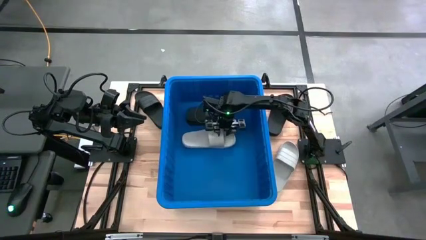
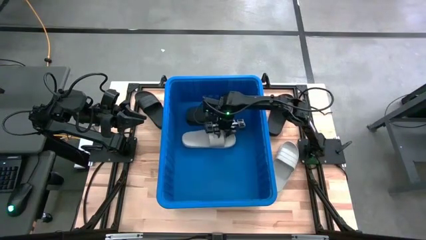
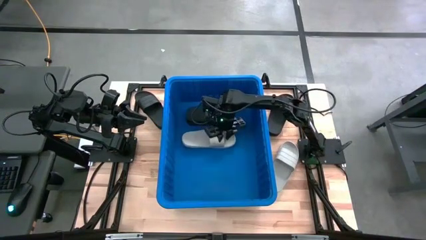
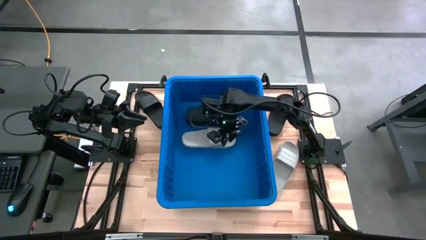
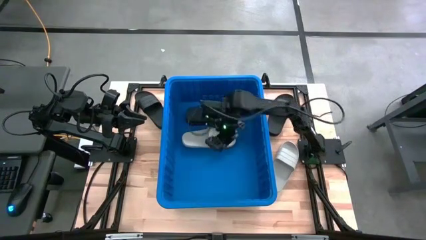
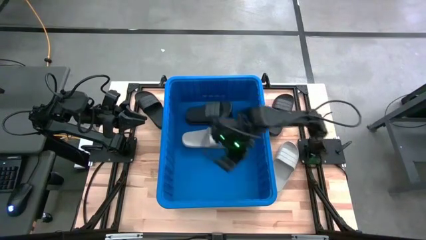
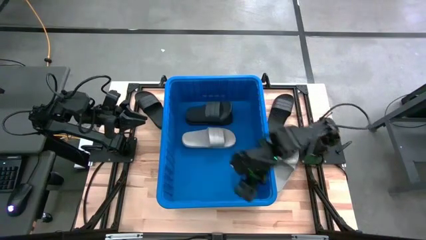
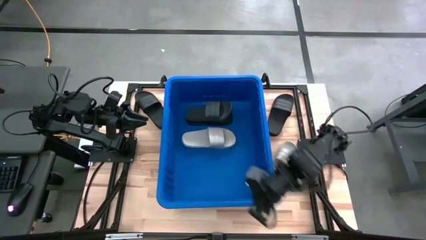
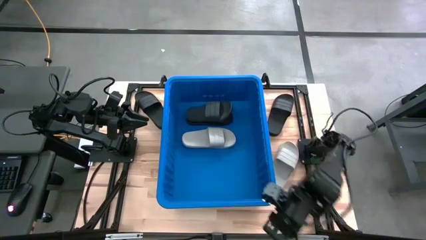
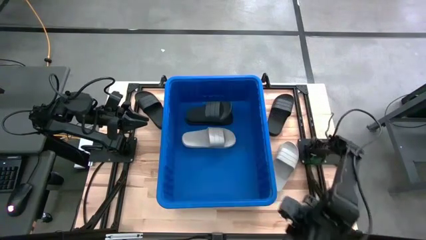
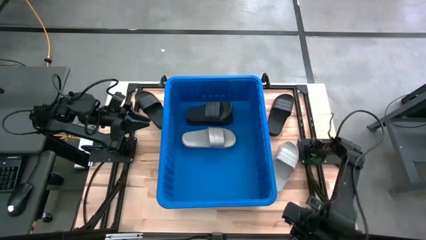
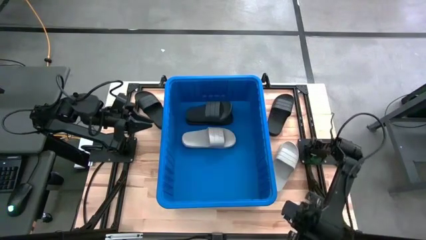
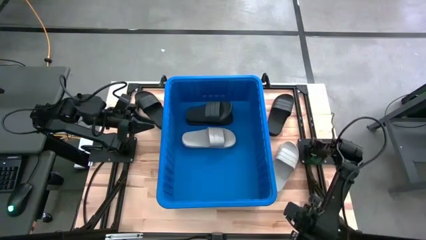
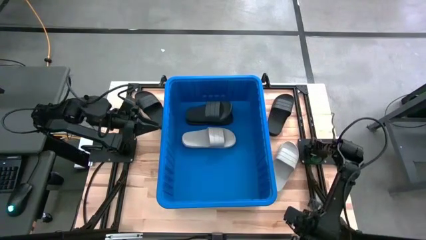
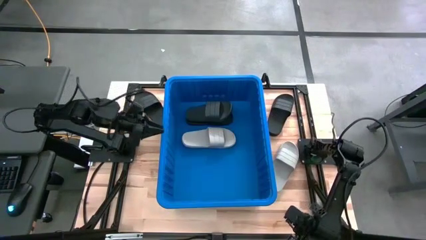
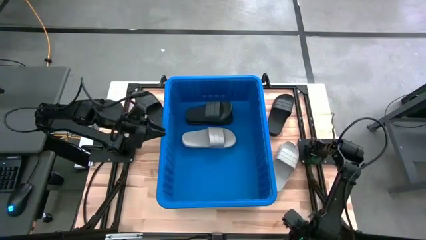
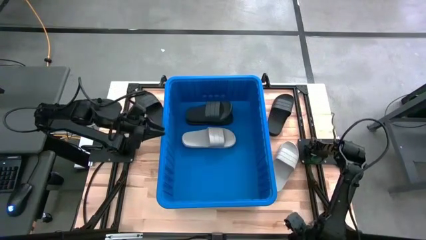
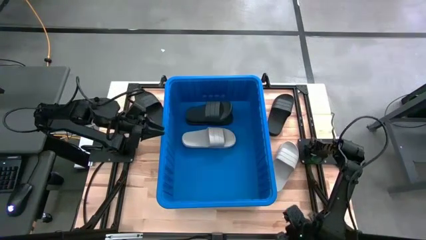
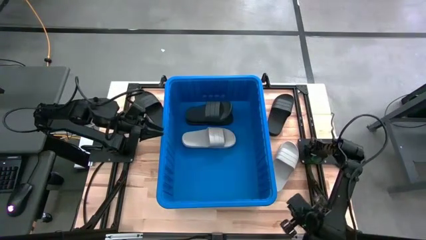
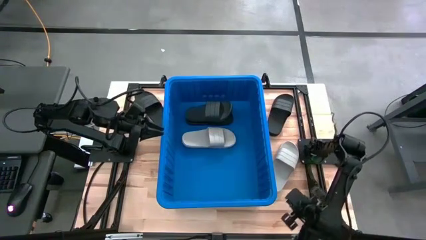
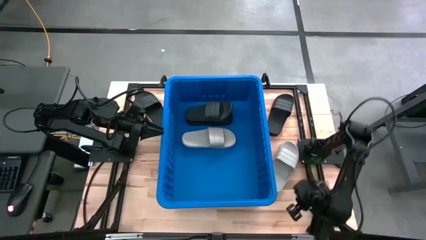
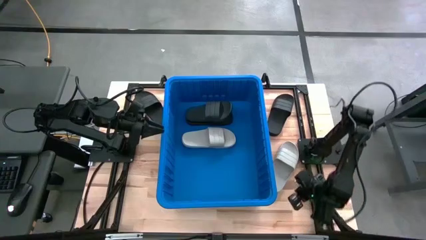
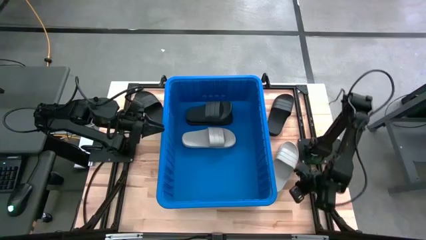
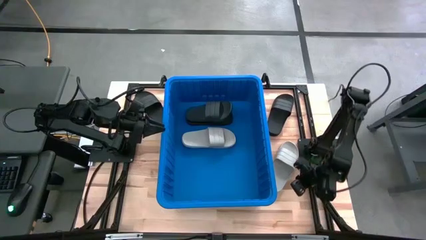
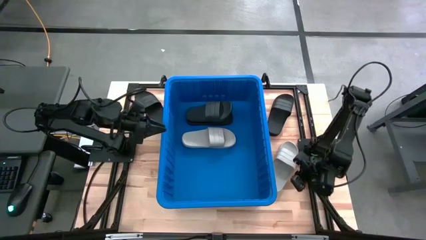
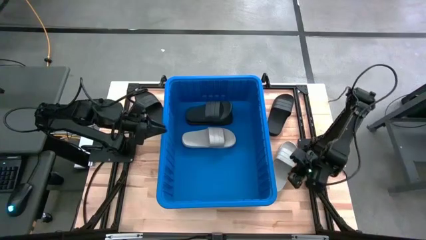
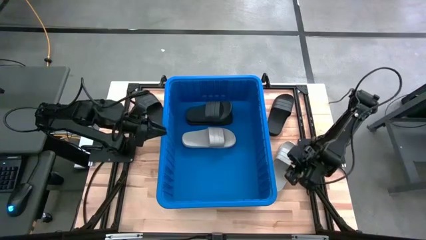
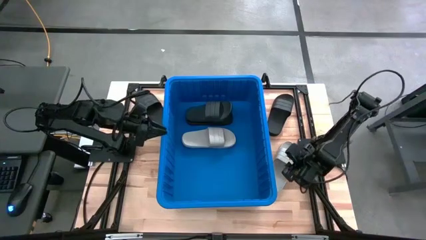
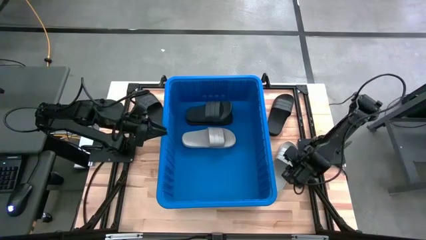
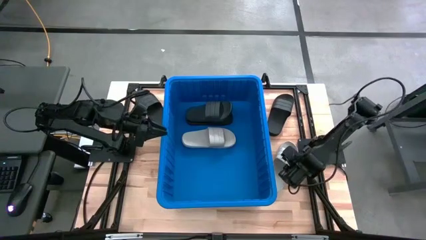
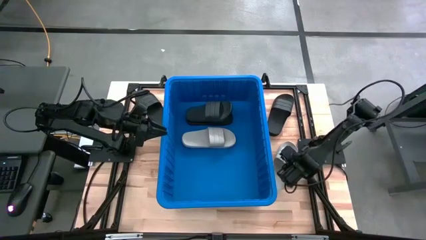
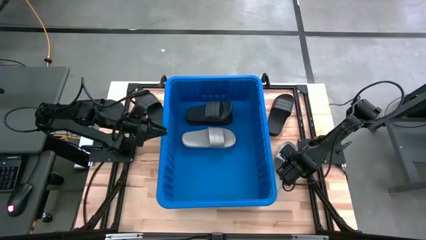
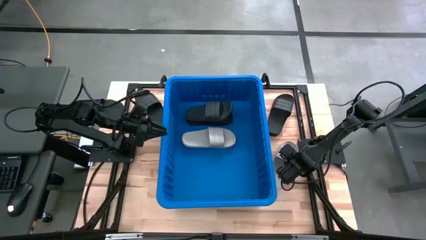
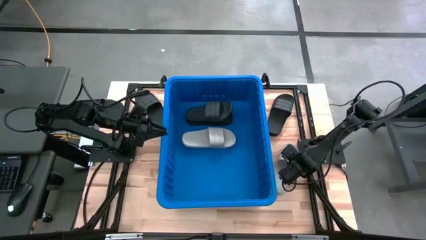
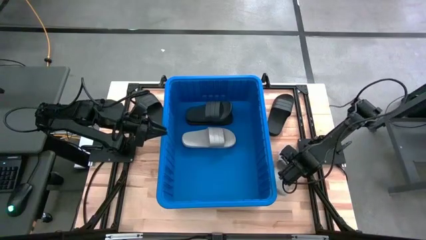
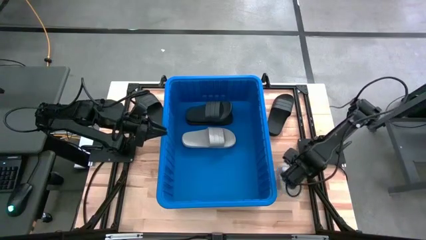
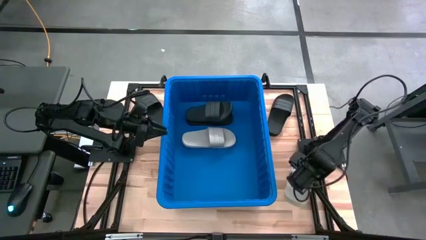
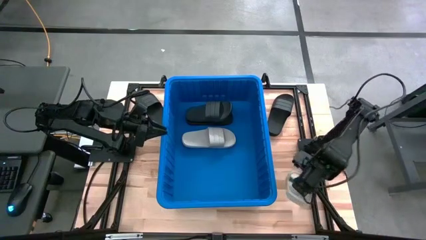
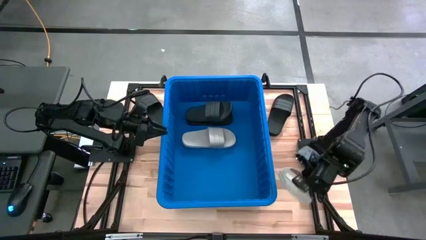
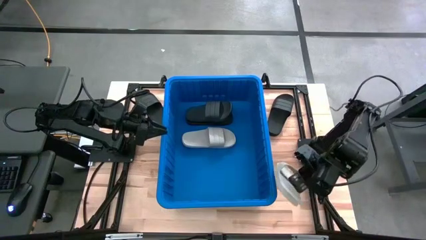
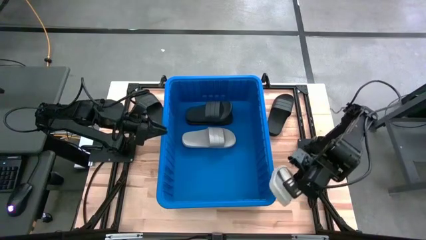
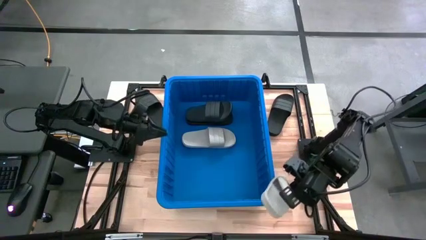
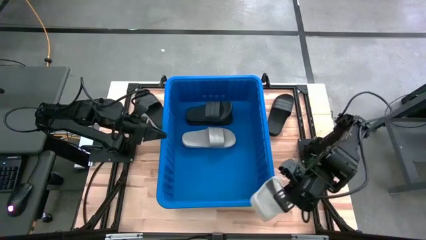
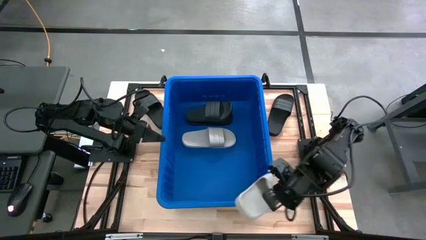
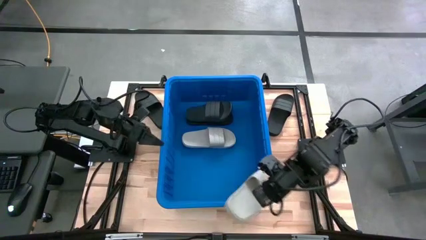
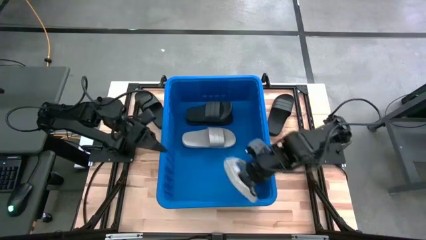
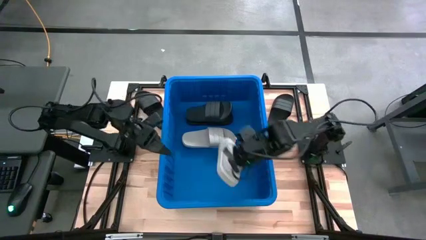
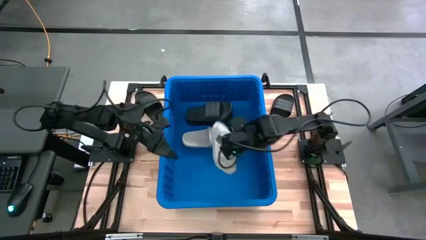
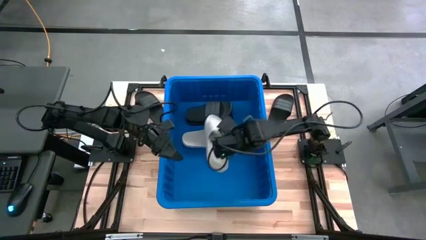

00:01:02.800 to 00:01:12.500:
Task: Pick and place slides into bin
Put the gray slide into the blue bin

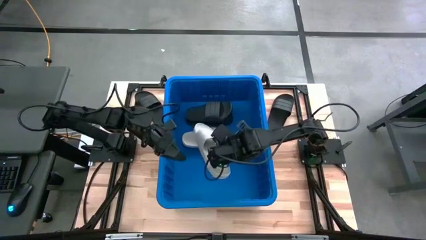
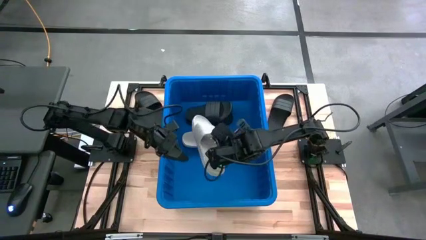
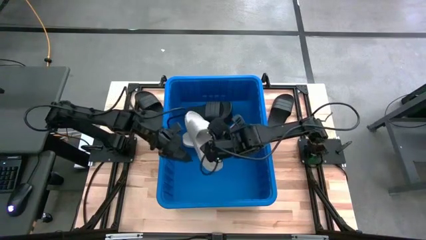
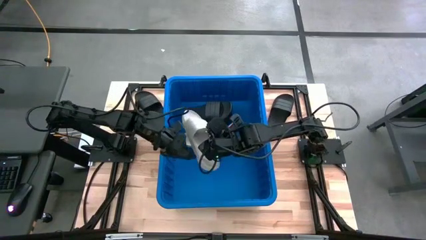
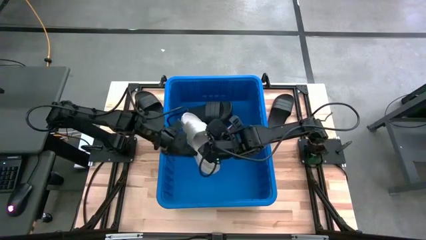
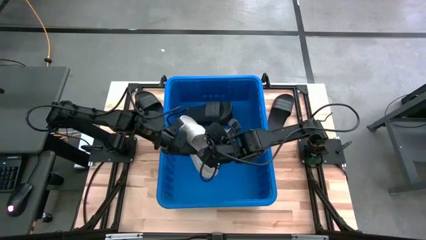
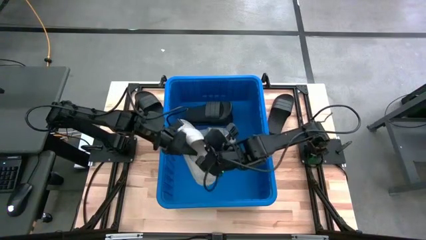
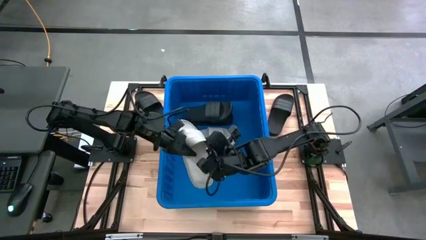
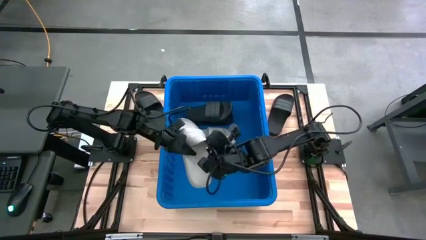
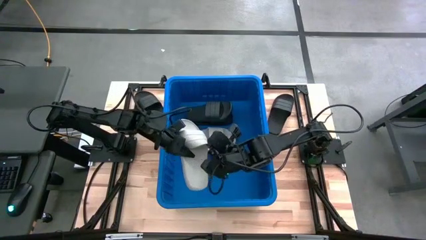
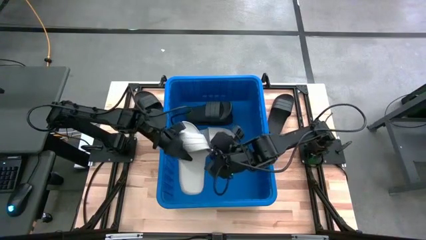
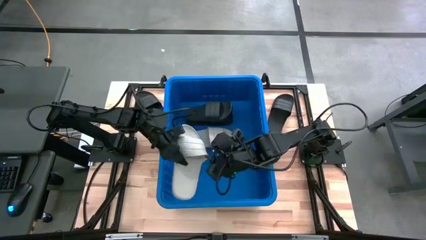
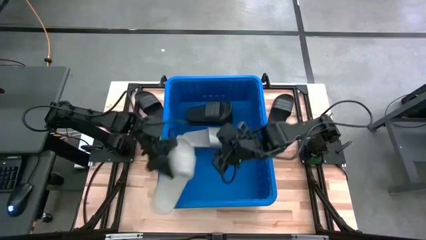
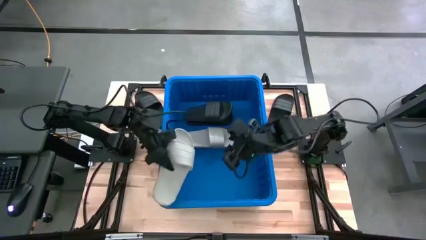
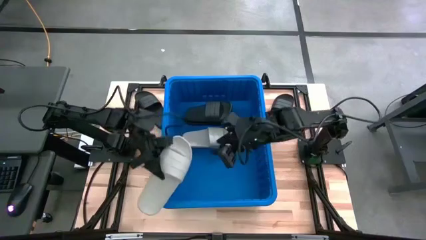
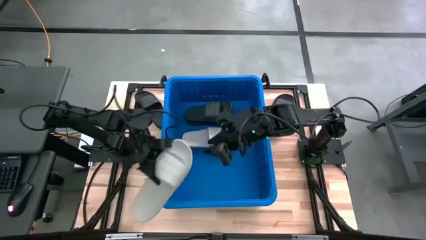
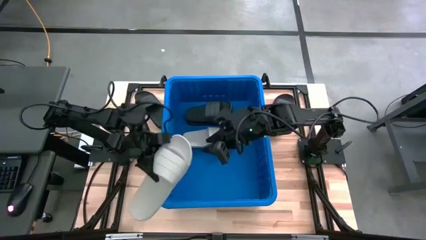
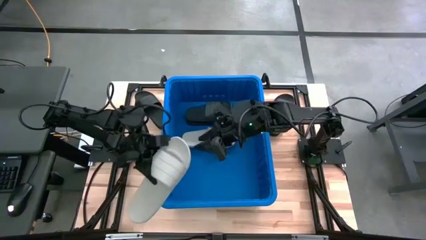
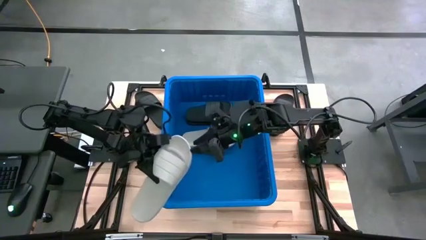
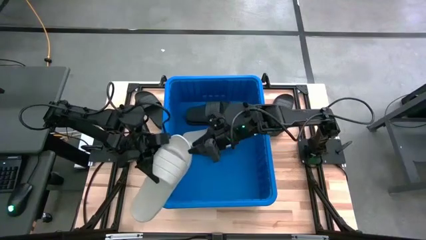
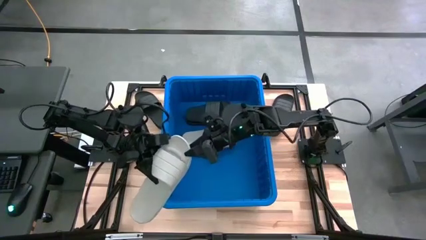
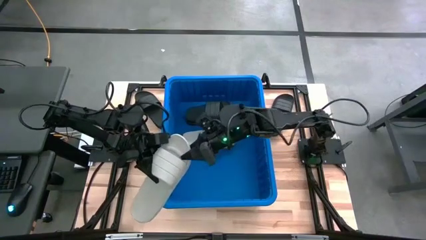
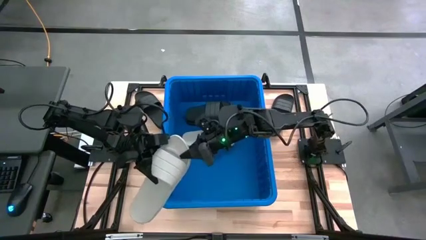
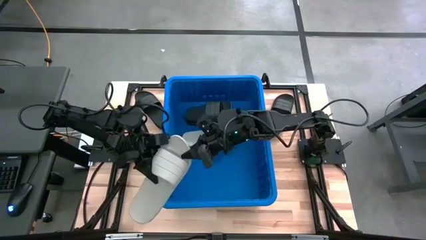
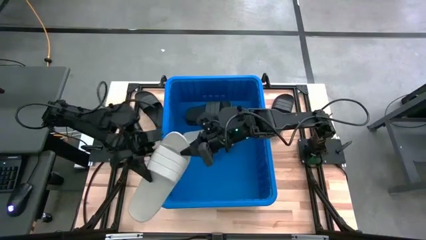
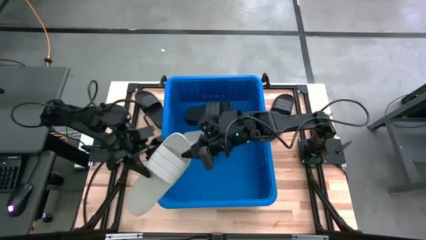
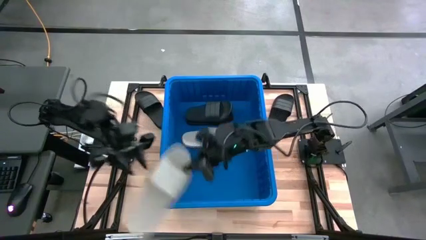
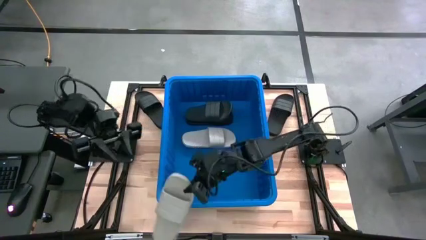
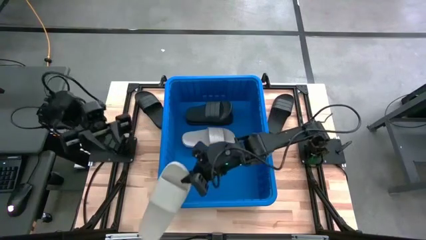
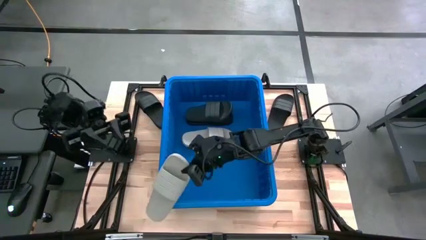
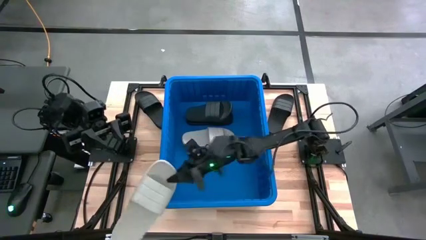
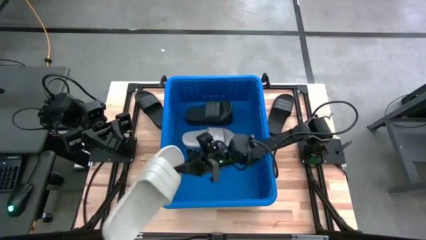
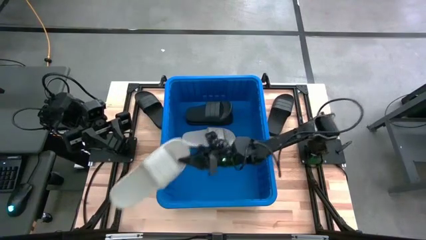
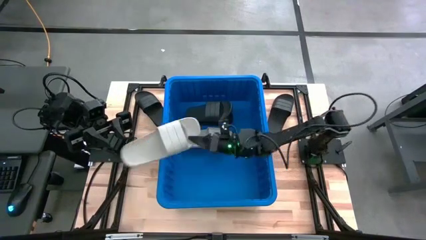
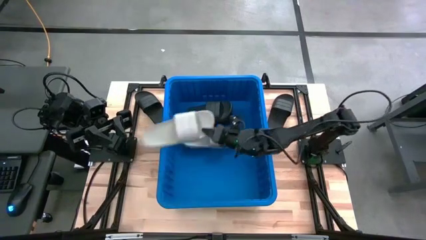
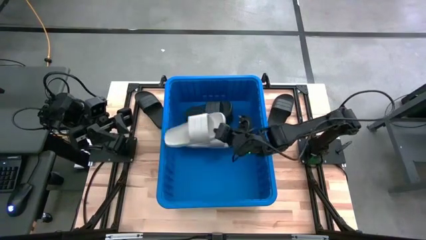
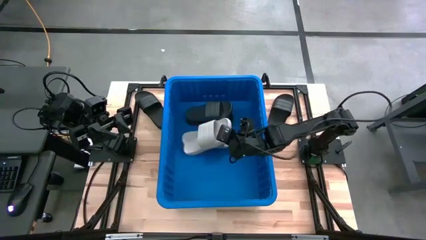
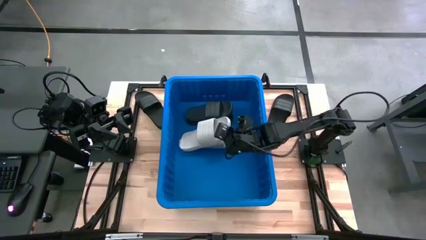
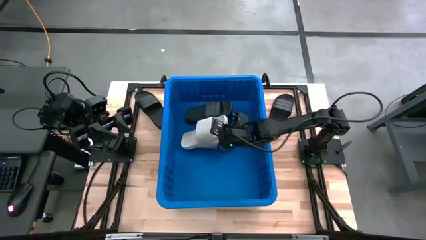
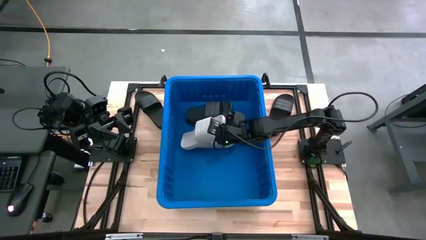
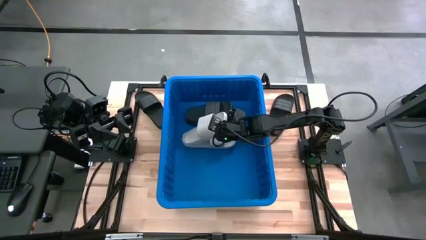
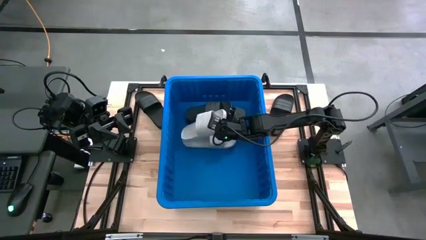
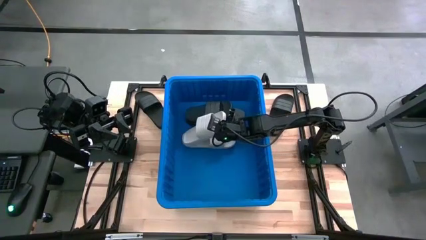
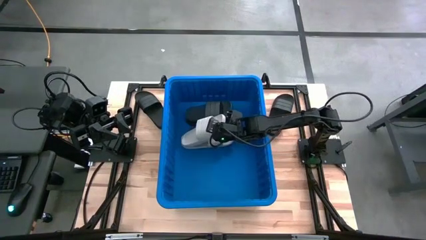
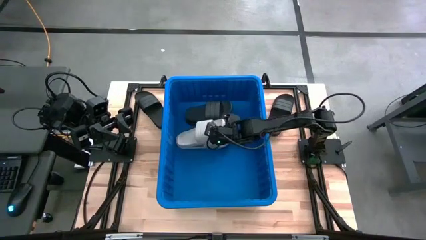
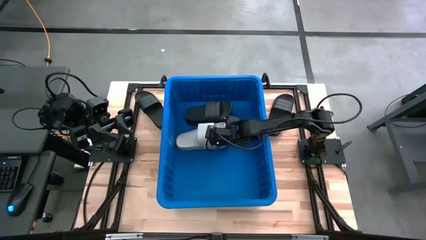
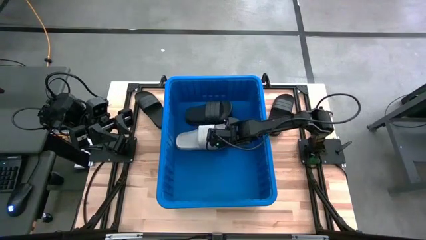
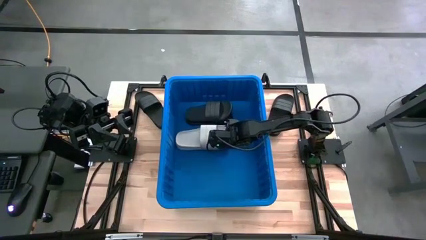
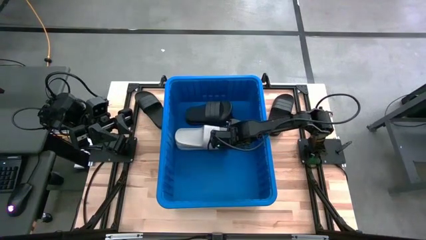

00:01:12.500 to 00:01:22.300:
Put the gray slide into the blue bin
